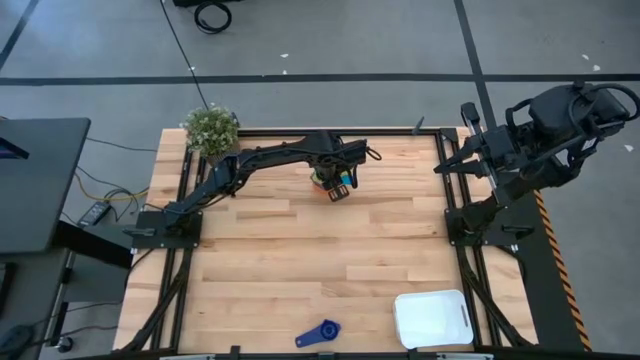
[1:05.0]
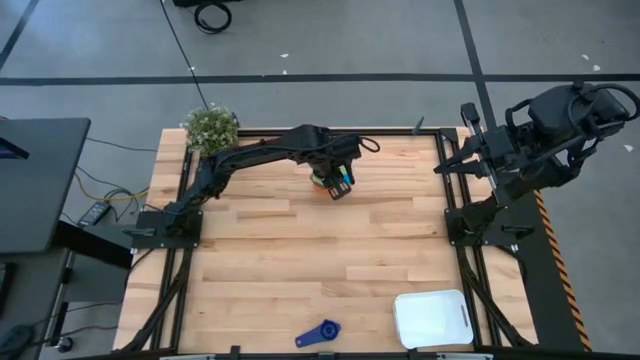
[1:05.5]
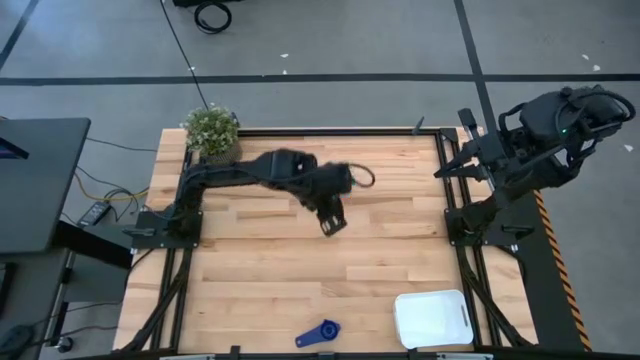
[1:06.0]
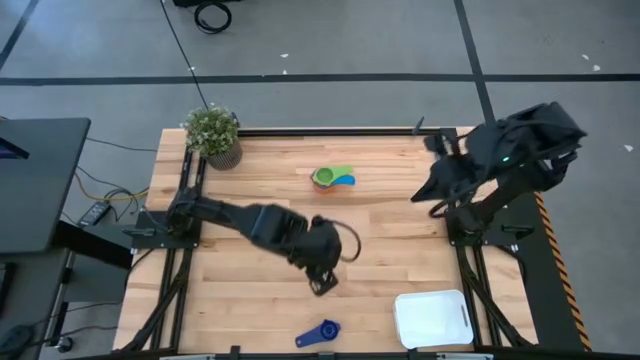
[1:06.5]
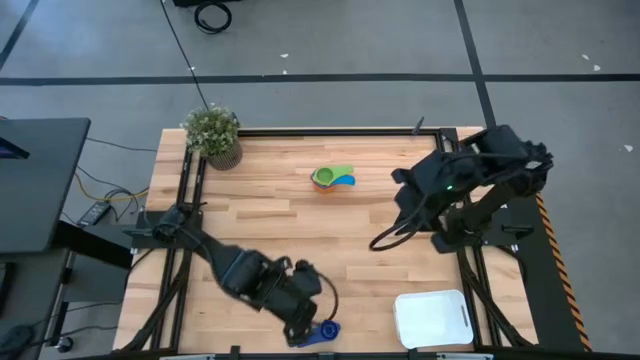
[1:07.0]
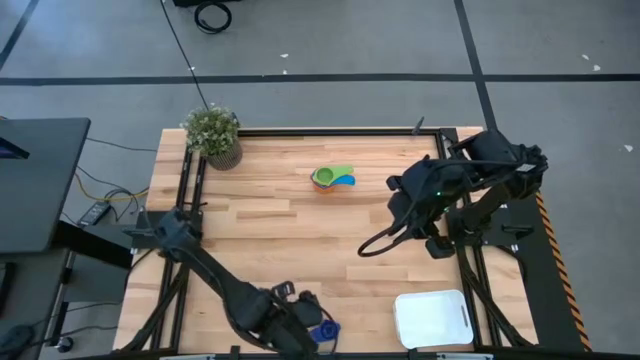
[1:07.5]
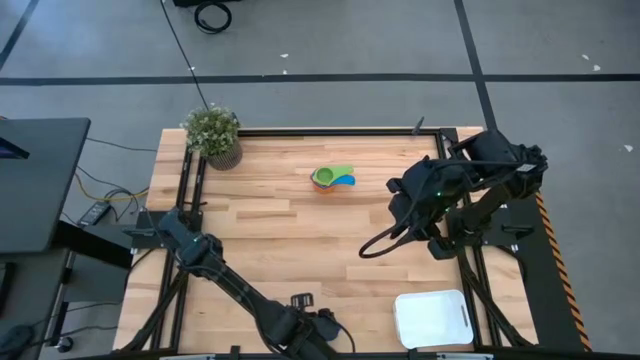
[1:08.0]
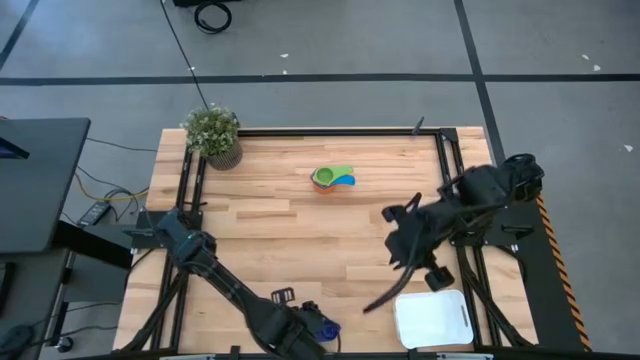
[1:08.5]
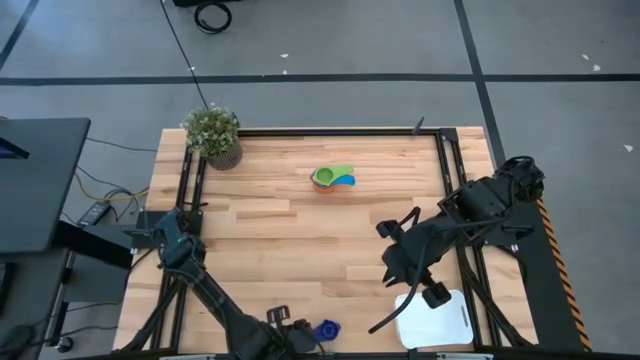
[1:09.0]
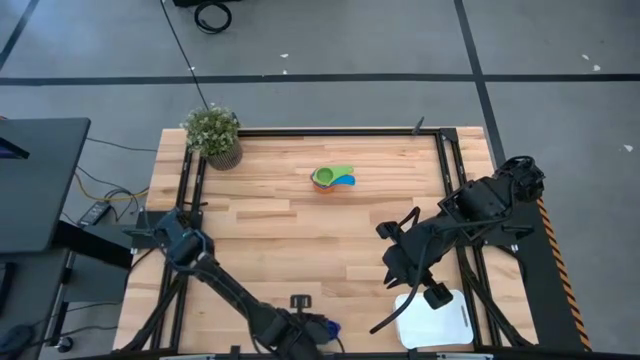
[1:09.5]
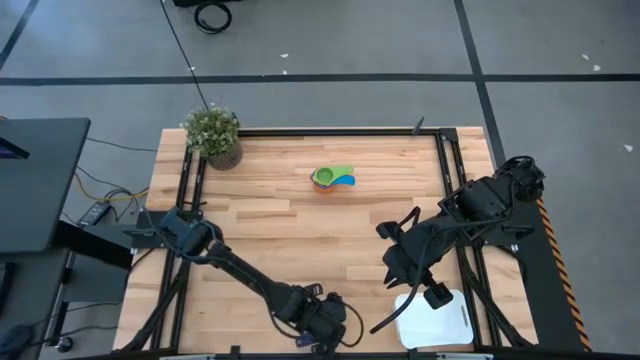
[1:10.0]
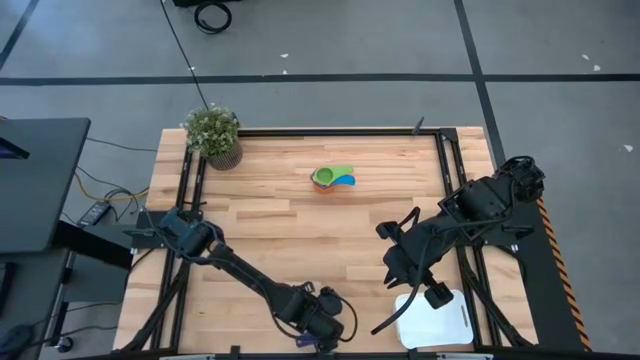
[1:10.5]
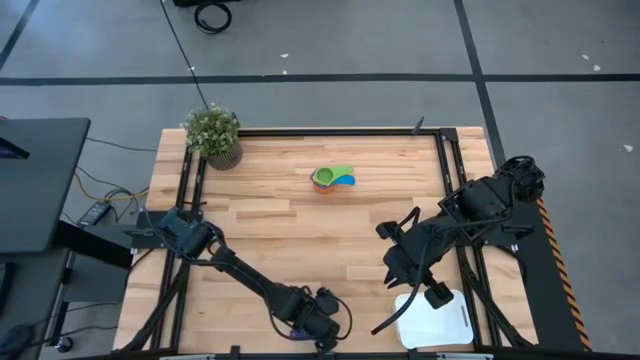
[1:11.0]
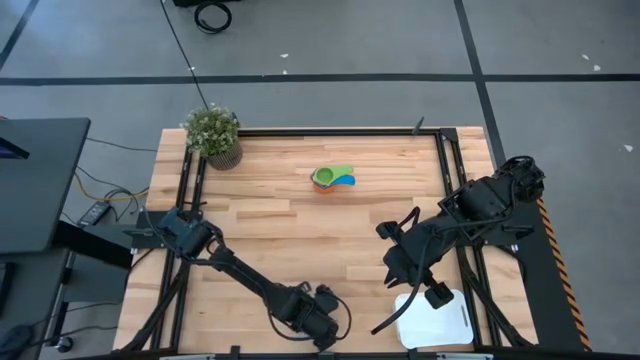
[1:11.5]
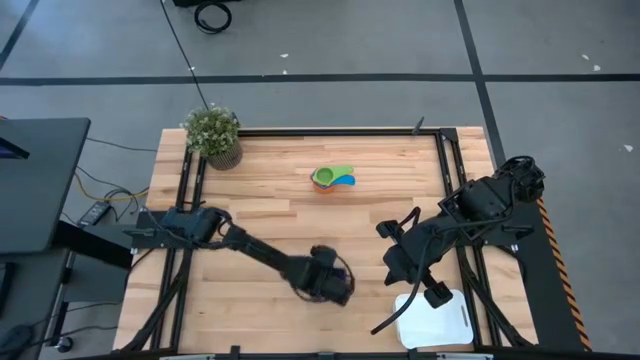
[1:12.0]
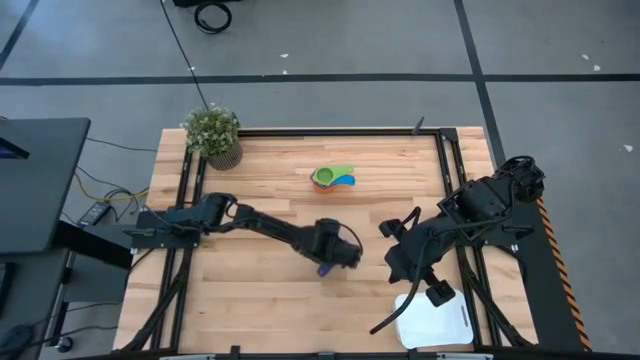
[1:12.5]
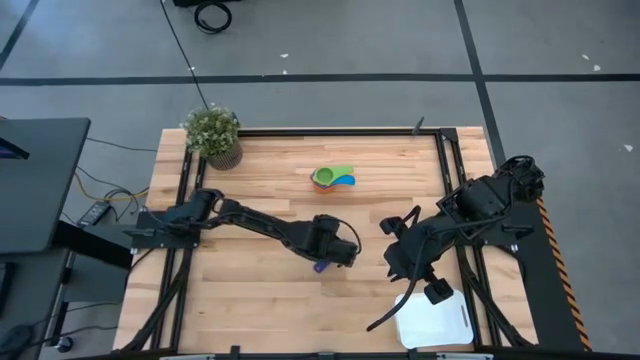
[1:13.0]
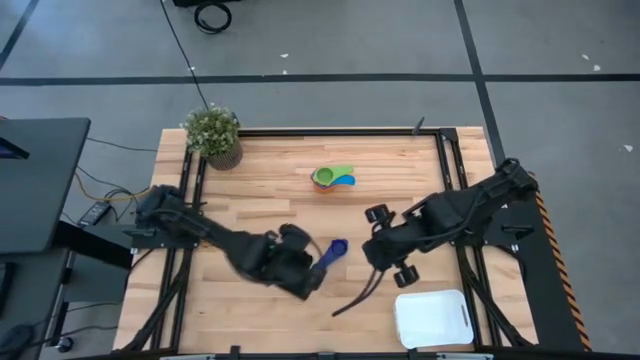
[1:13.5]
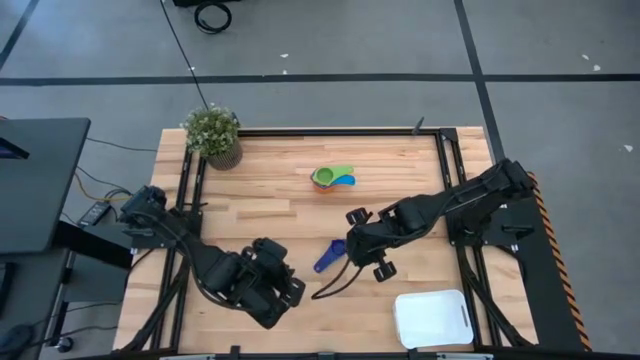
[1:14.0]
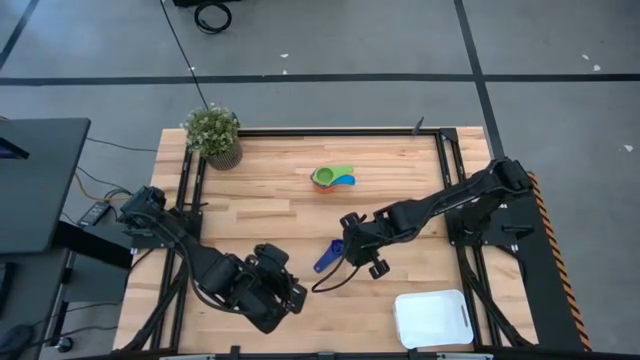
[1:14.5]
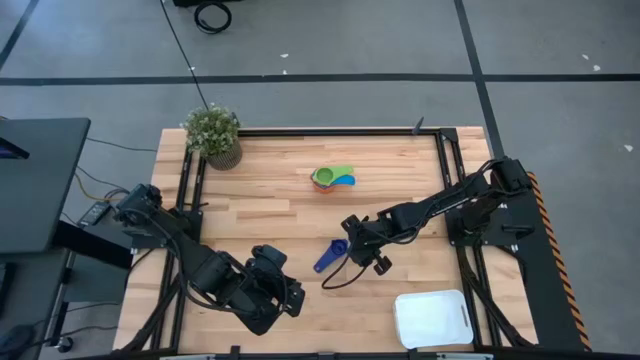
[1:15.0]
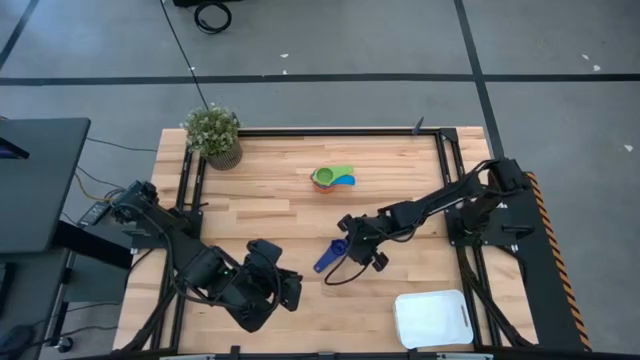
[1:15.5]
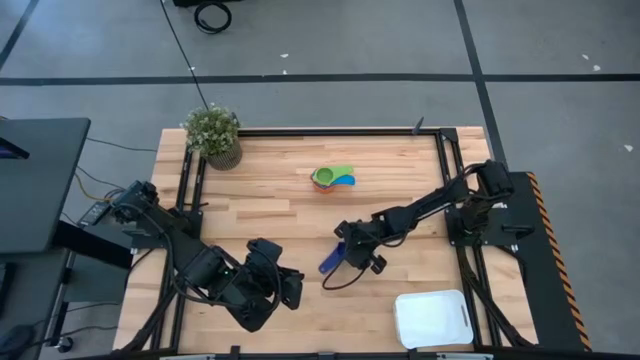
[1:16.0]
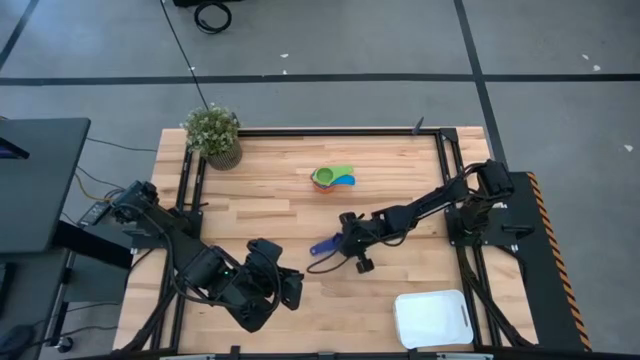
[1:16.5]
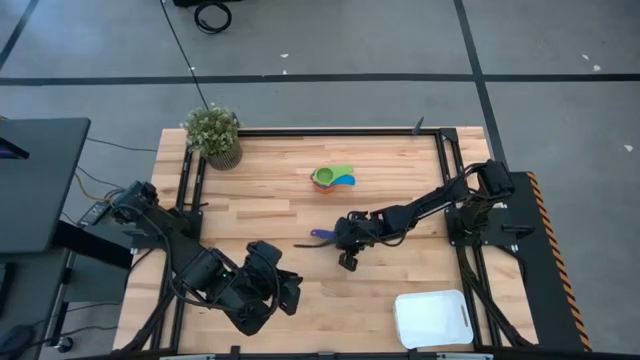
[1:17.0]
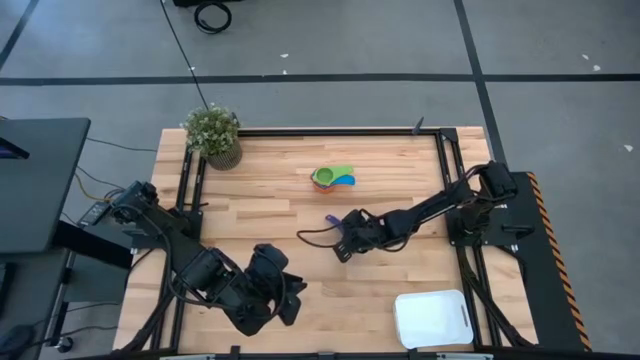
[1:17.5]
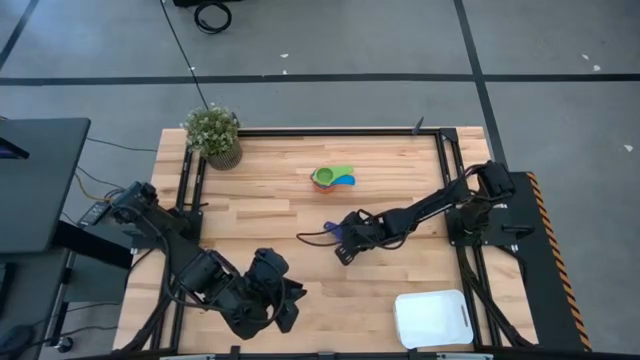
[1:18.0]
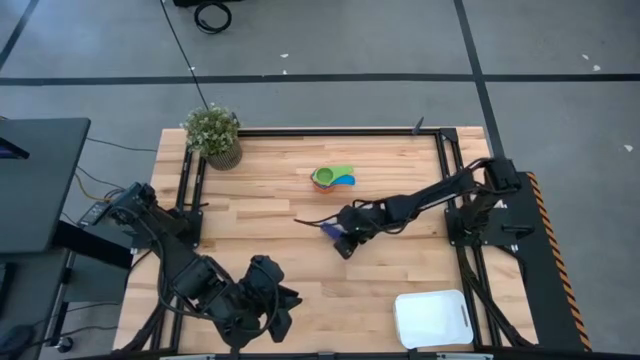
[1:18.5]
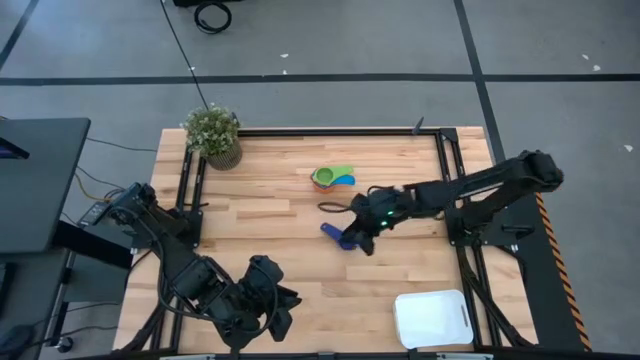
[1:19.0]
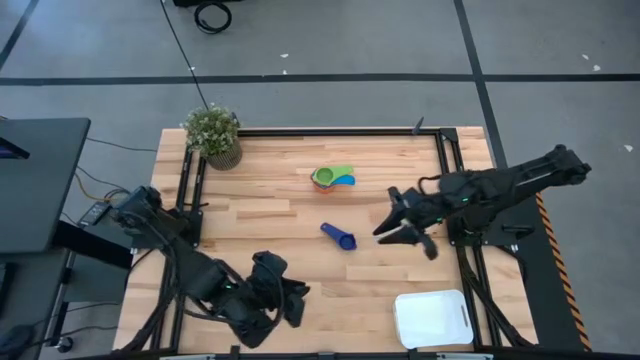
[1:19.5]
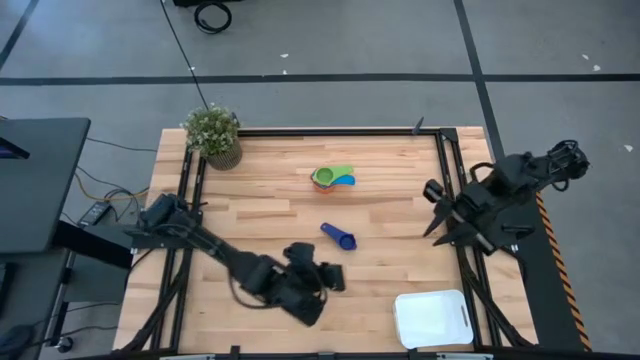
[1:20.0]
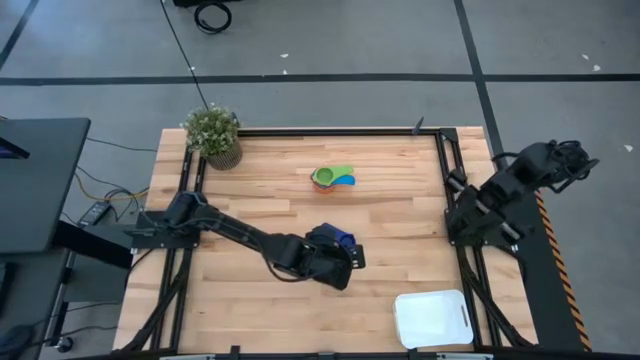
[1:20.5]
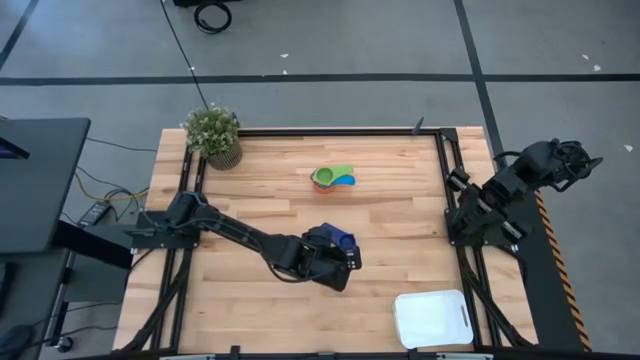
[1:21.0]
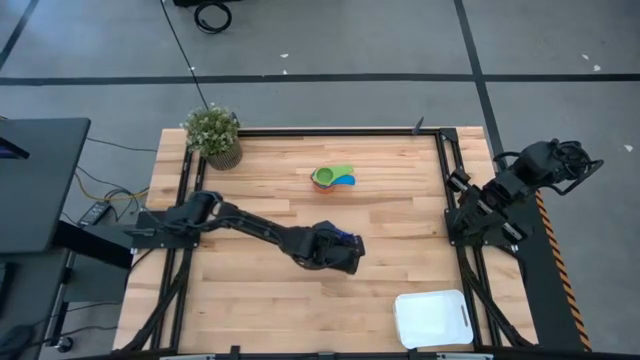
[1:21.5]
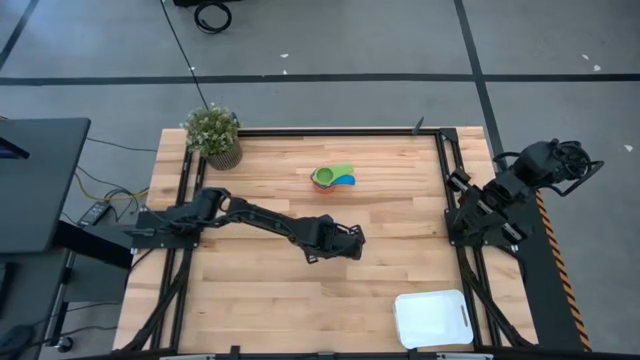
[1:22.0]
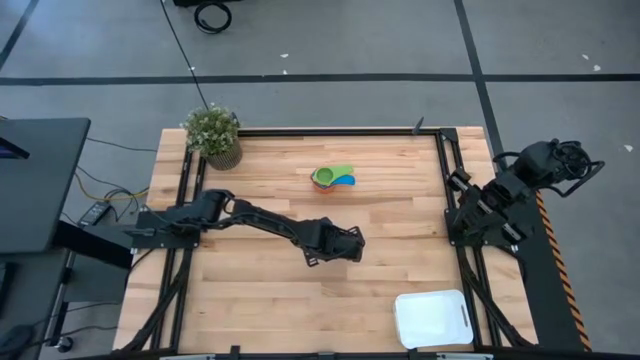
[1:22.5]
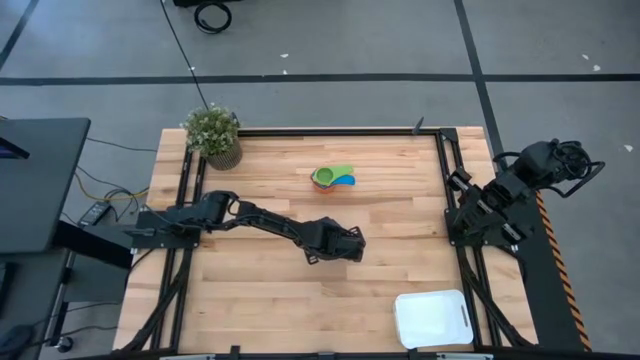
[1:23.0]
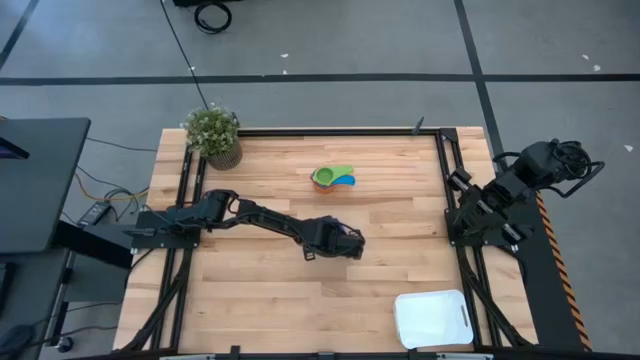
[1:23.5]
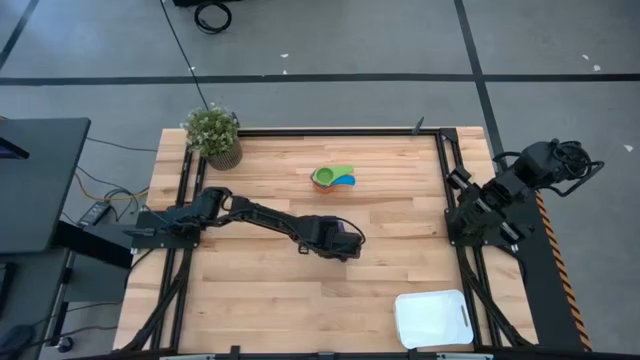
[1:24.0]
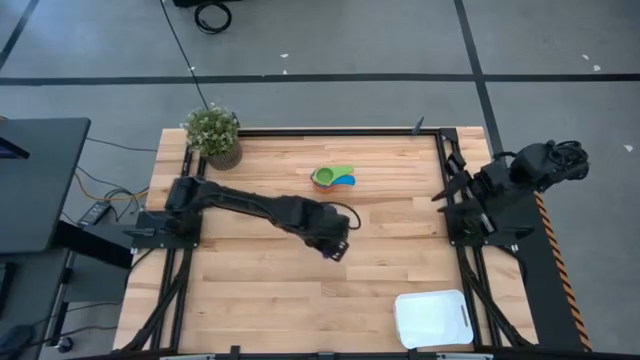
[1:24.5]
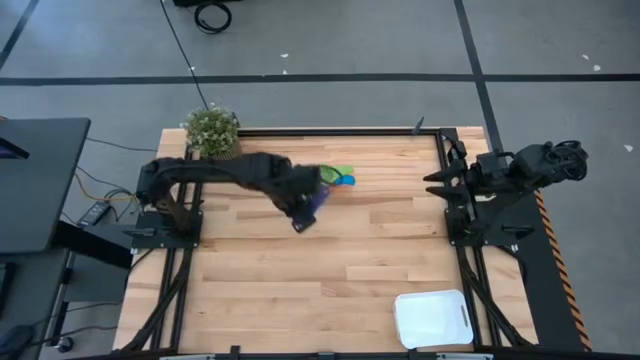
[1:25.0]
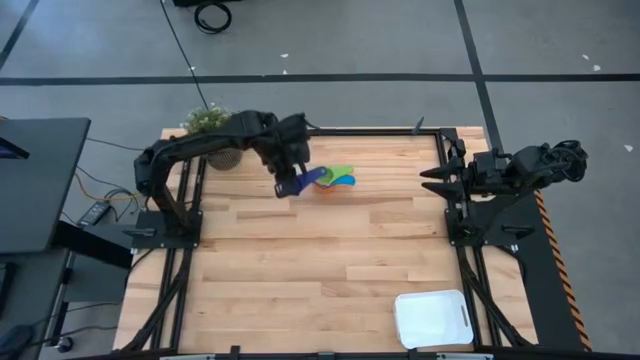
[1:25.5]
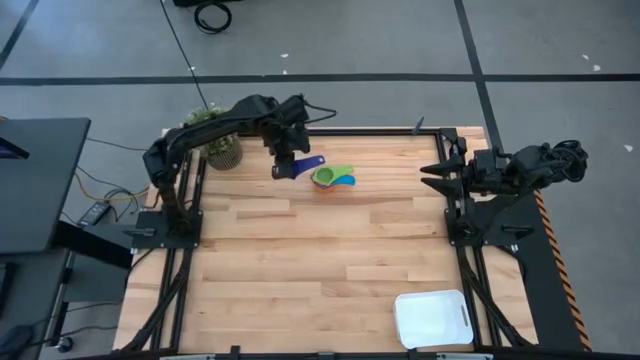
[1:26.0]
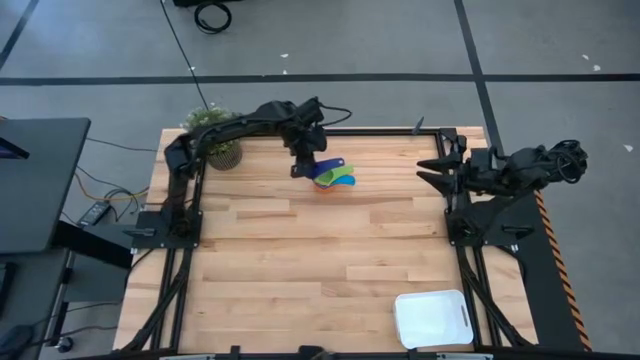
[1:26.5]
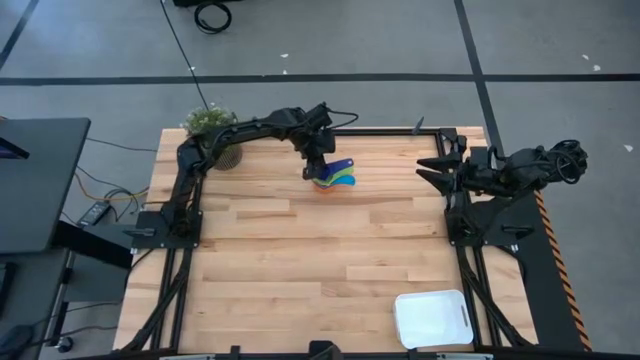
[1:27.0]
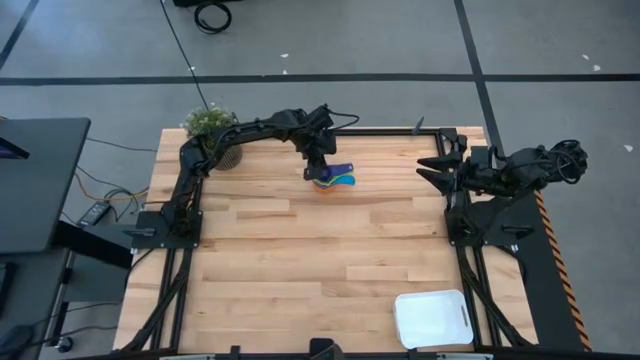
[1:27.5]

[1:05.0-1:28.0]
Task: Nest measuring cups in basket
Stack the dark blue measuring cup on top of the green measuring cup
